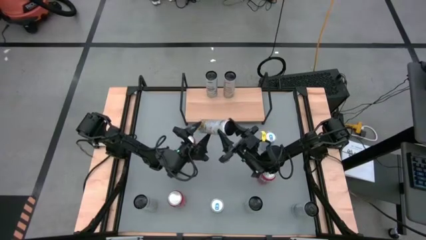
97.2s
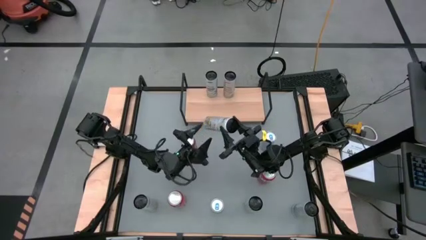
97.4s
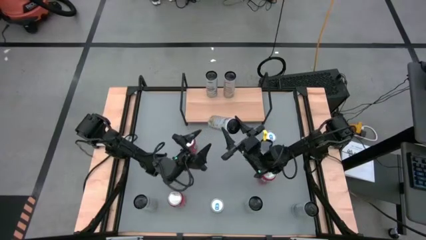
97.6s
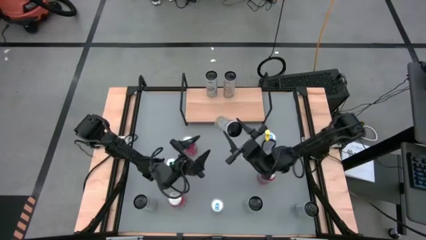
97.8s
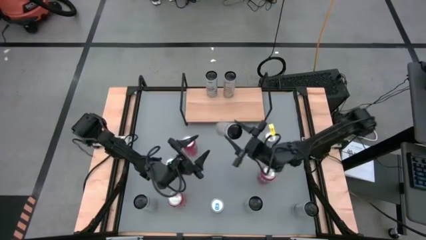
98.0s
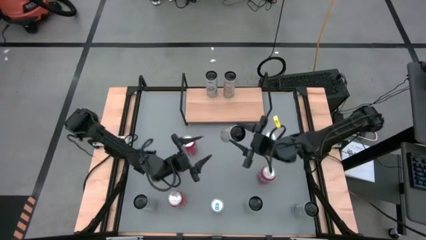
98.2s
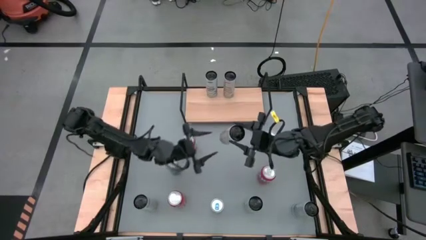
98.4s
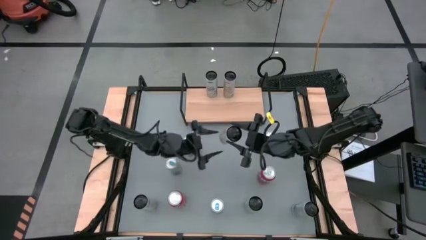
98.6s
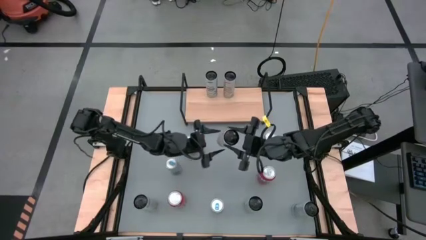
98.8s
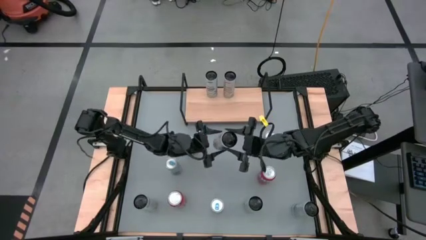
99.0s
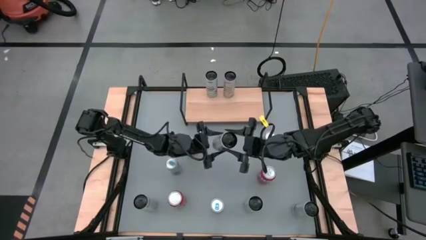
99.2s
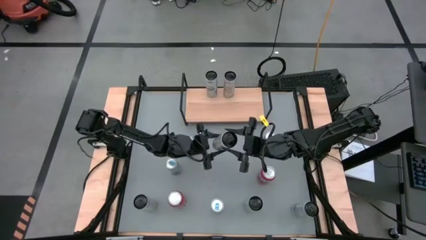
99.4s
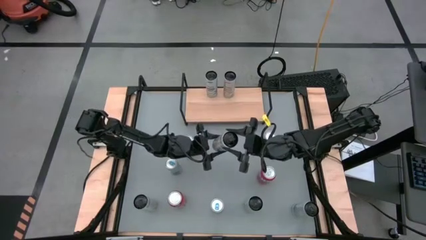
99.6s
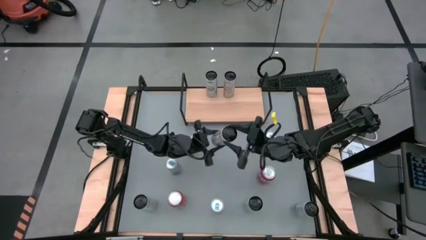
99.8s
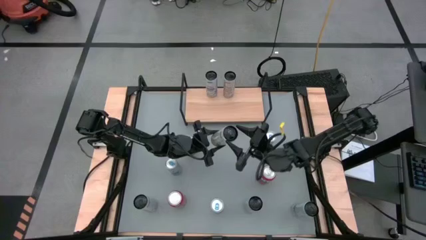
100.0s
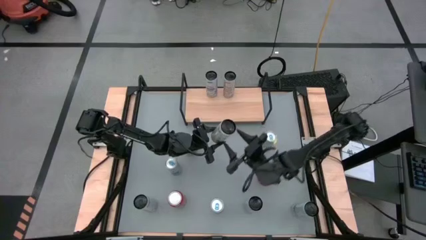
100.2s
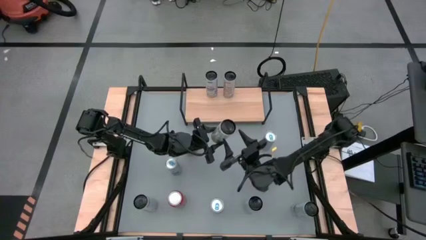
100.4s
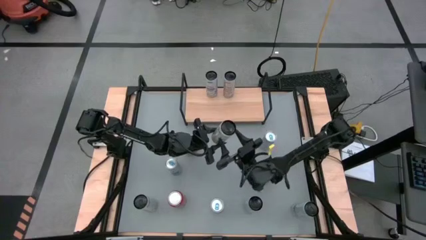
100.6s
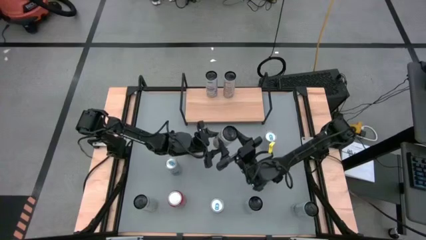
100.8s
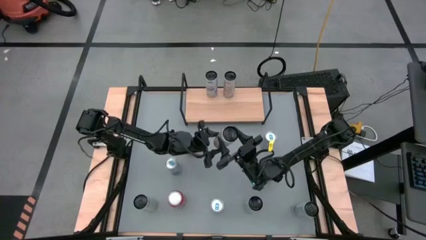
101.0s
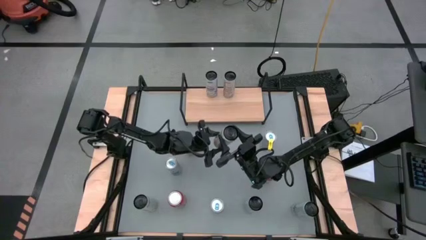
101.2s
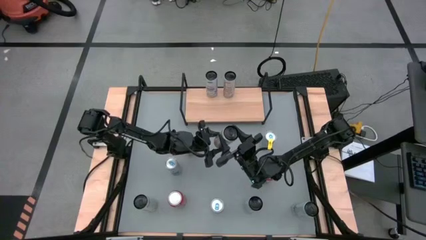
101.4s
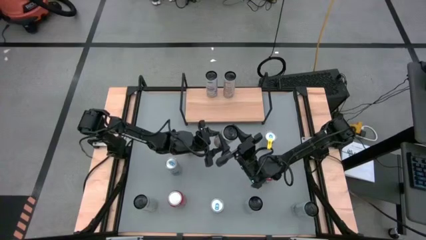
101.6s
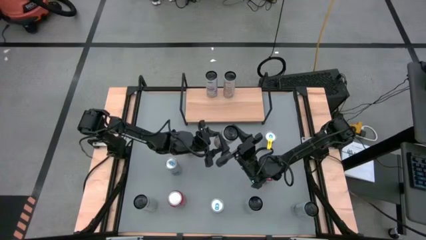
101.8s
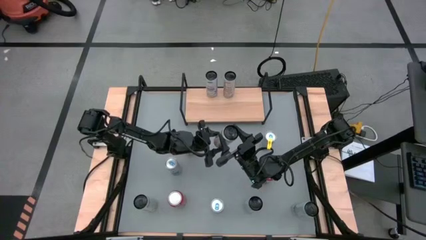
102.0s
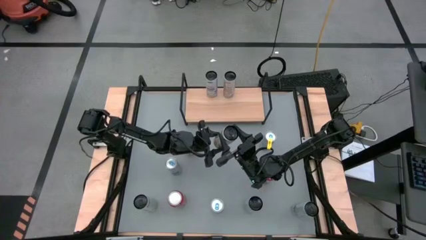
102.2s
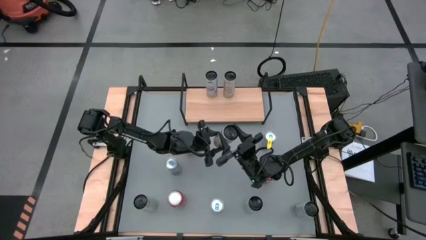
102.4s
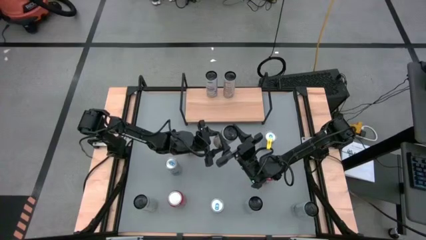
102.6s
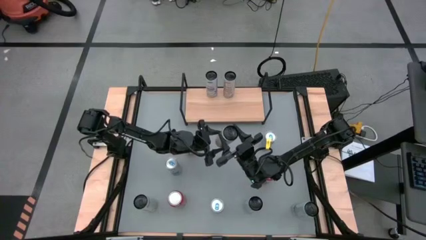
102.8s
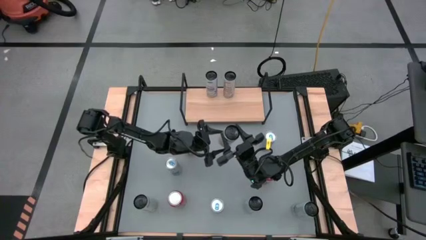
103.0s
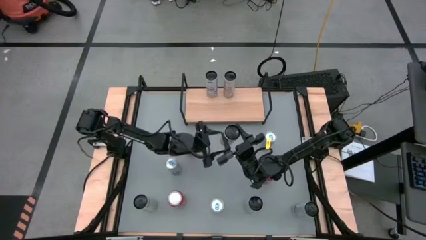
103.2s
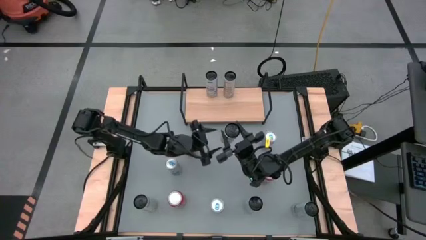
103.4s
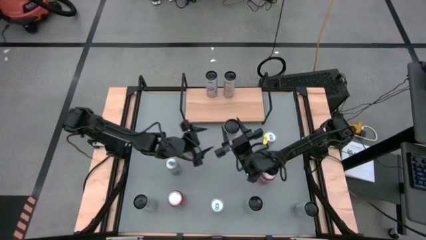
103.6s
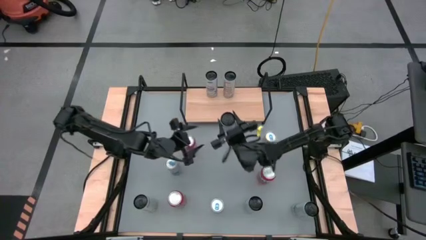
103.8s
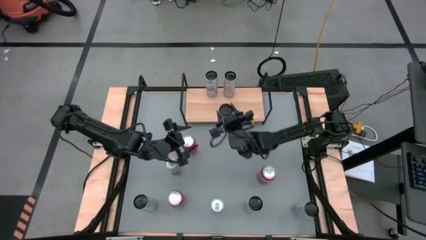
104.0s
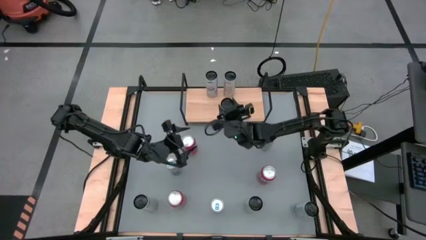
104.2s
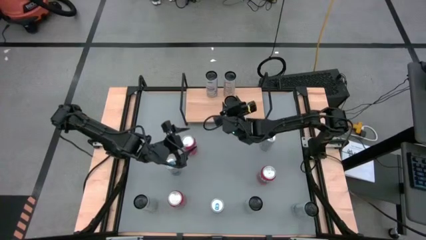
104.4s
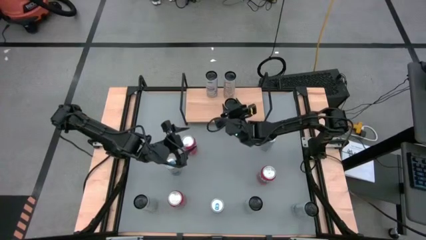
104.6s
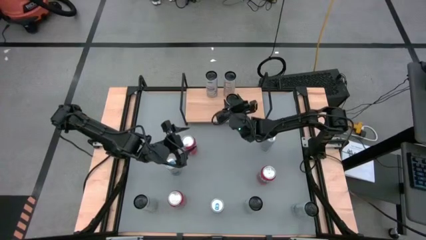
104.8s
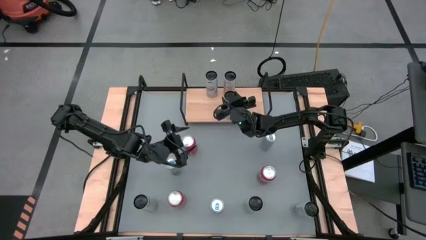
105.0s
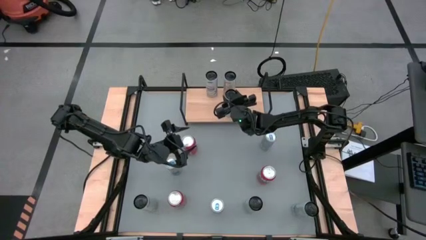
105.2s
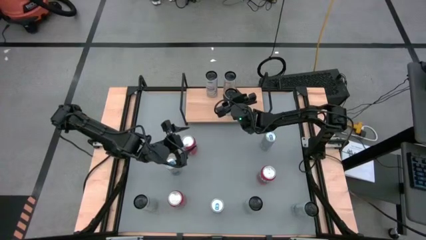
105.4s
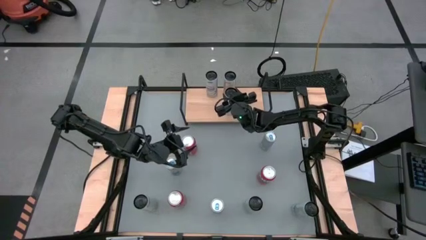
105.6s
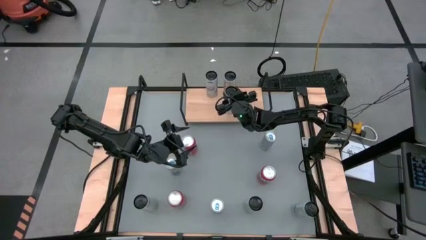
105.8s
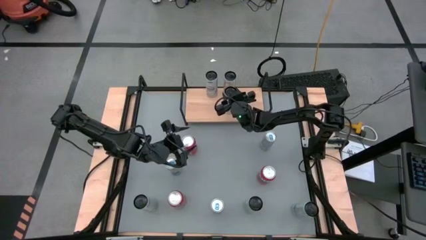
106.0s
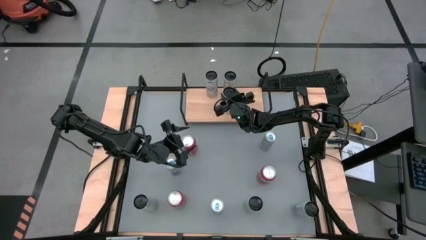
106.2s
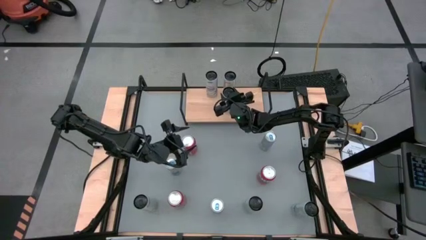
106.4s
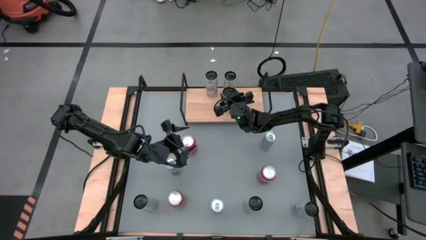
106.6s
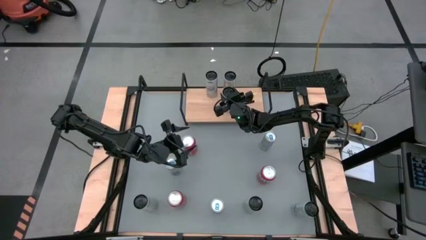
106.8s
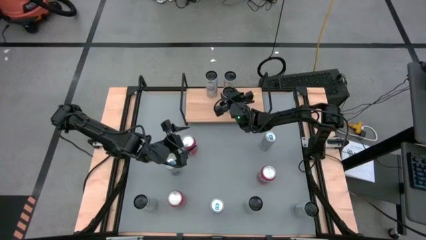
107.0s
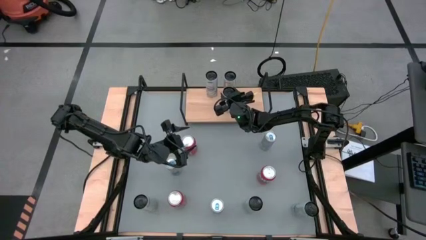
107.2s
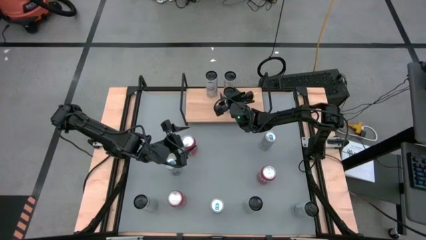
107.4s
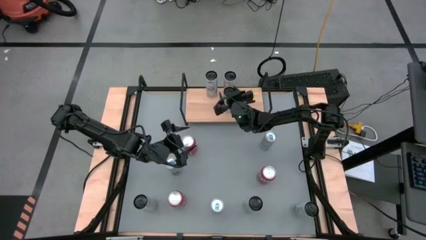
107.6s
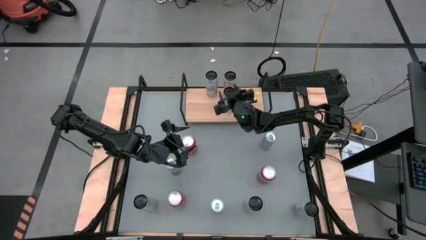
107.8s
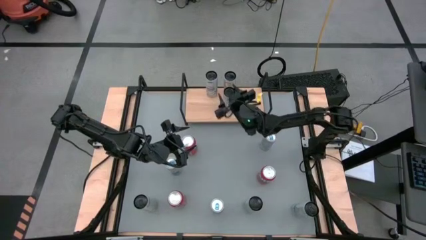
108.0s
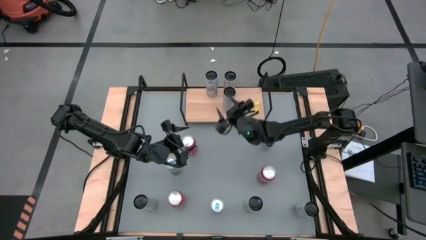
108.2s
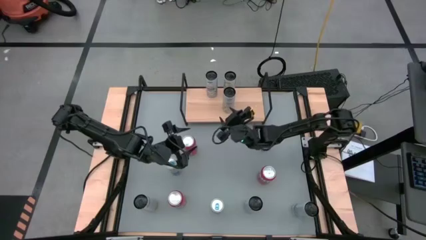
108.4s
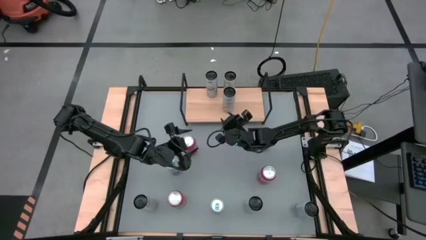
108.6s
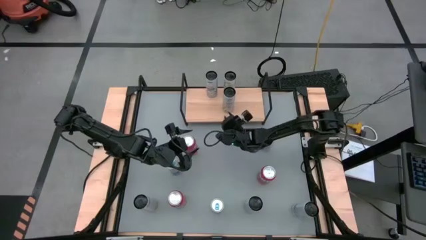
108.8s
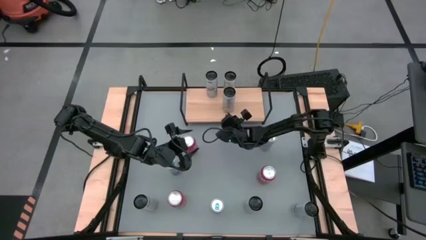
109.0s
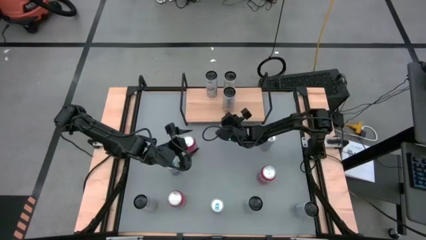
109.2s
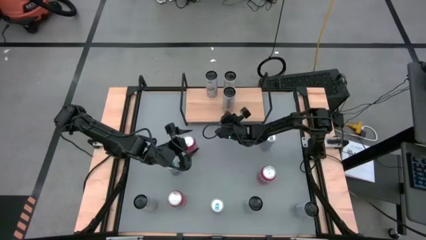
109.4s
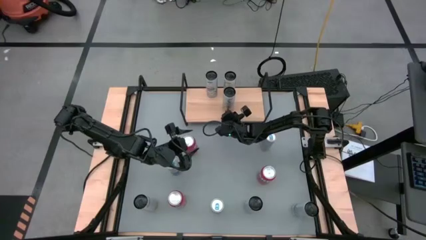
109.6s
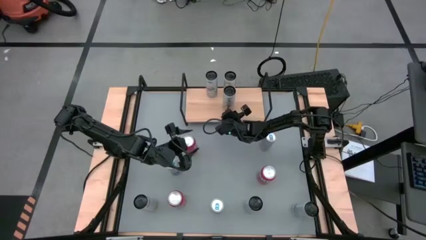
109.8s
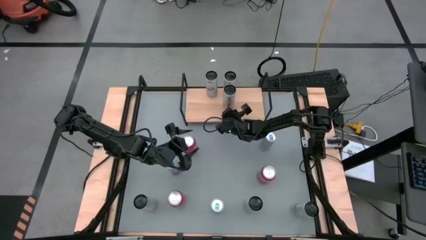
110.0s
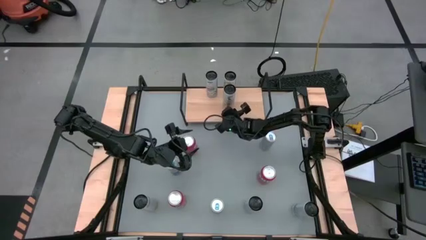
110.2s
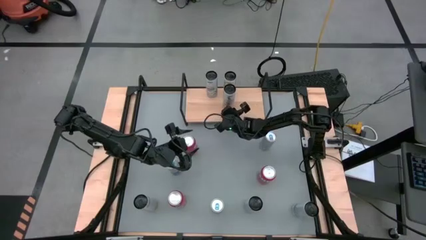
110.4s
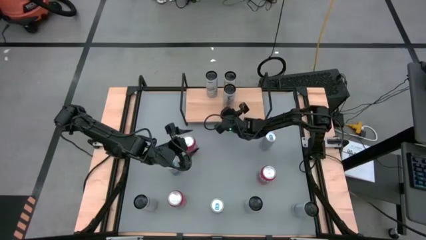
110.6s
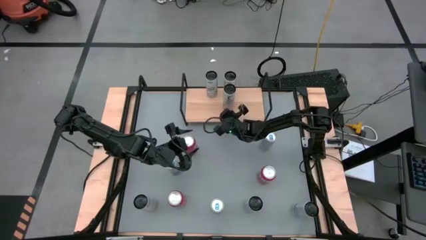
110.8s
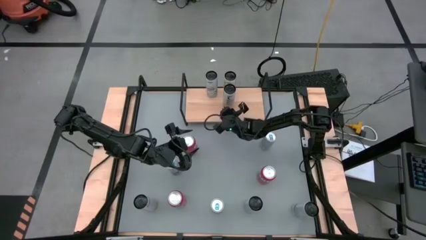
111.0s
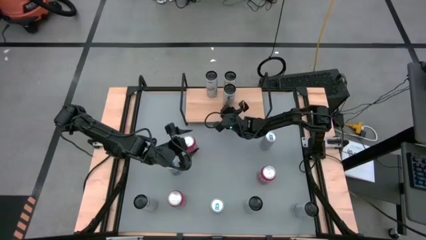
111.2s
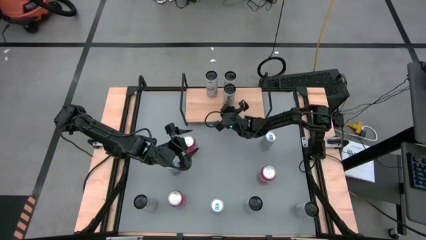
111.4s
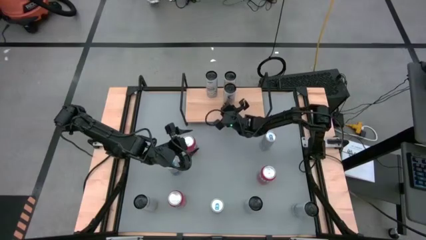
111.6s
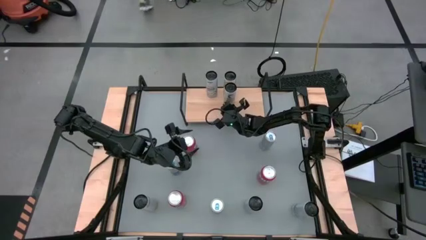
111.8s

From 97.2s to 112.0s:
Task: Place canned beverage on shelf
Put the top white yellow soda can aligned with the other white yellow soda can on the shelf
